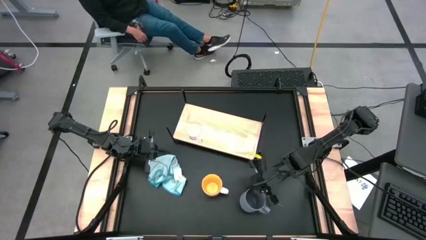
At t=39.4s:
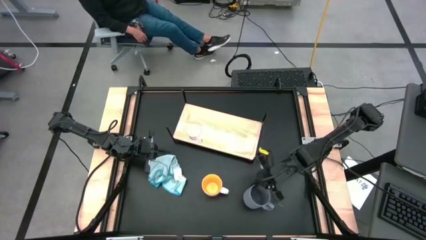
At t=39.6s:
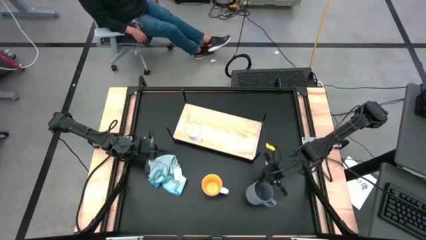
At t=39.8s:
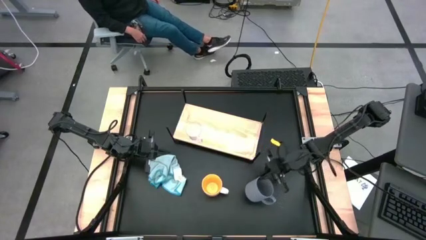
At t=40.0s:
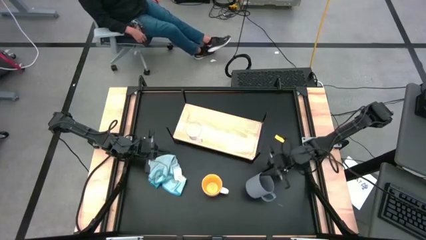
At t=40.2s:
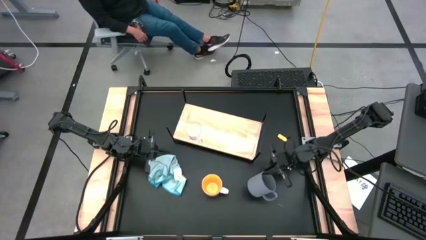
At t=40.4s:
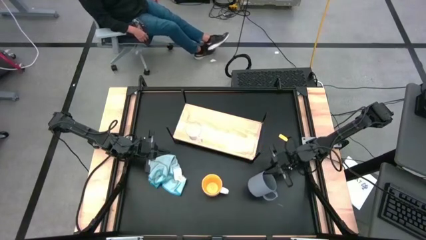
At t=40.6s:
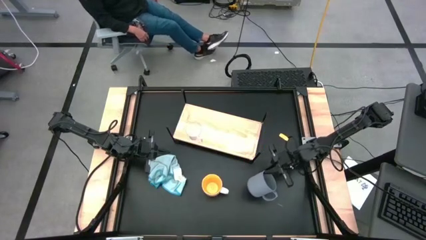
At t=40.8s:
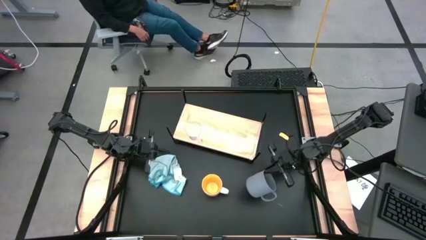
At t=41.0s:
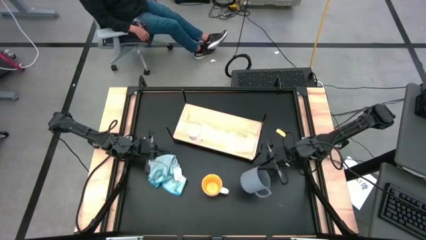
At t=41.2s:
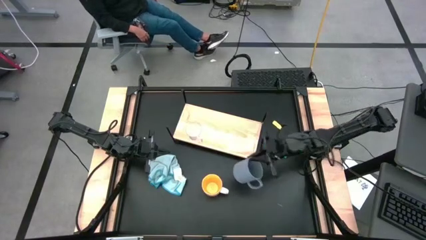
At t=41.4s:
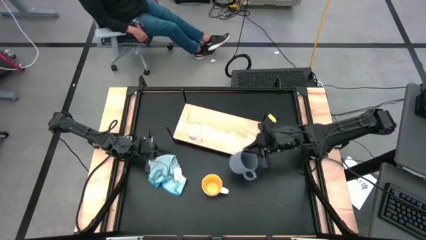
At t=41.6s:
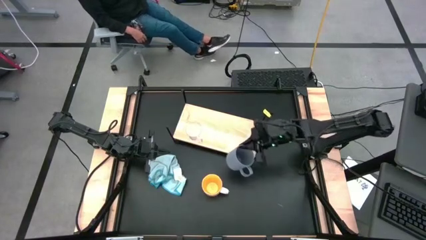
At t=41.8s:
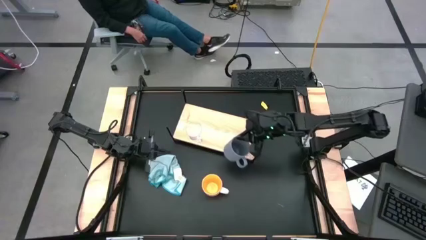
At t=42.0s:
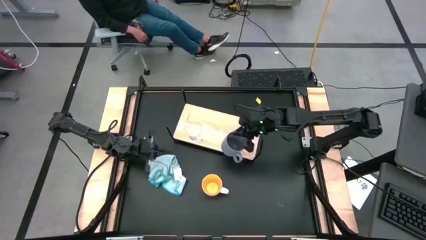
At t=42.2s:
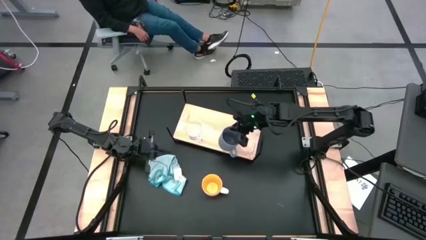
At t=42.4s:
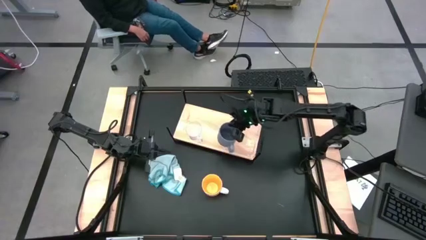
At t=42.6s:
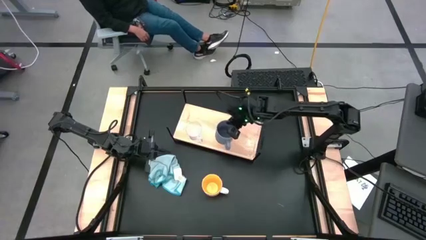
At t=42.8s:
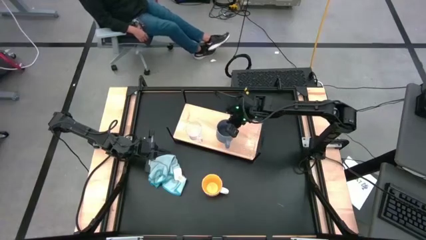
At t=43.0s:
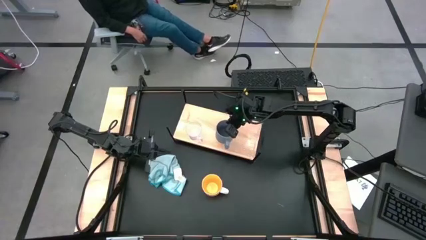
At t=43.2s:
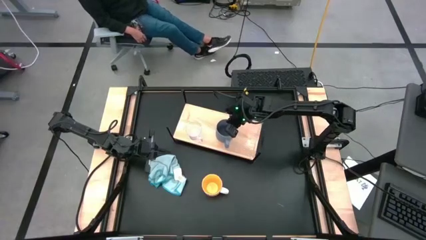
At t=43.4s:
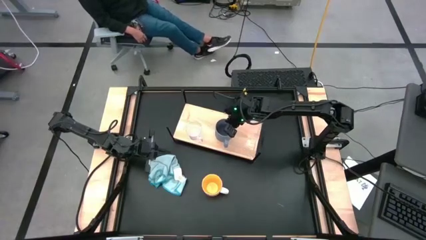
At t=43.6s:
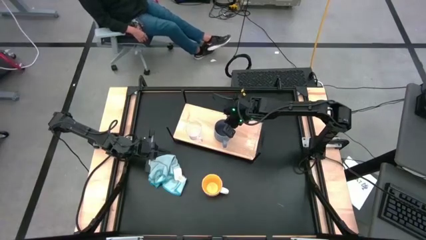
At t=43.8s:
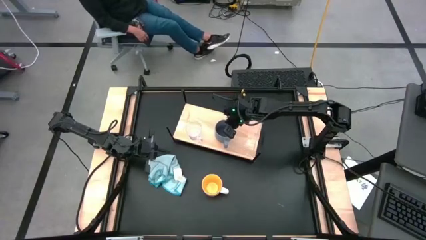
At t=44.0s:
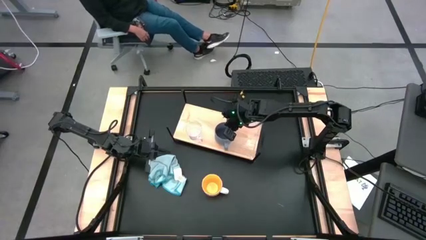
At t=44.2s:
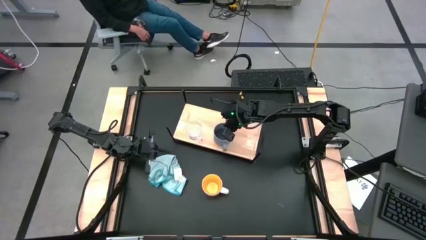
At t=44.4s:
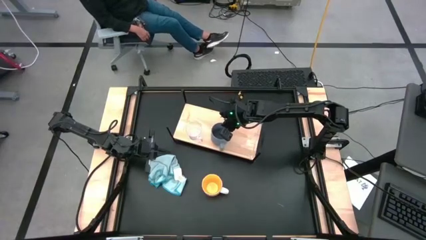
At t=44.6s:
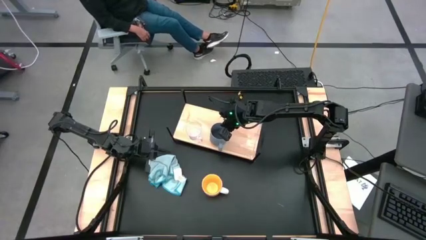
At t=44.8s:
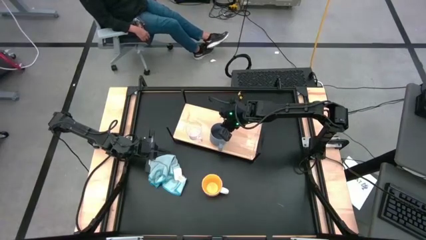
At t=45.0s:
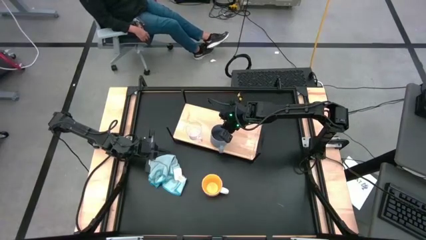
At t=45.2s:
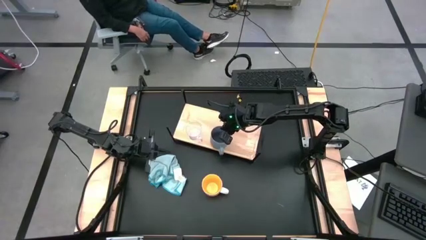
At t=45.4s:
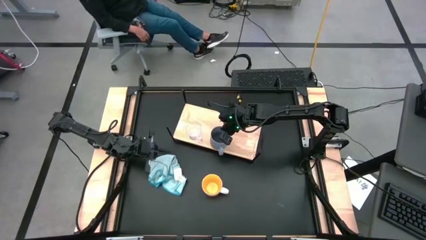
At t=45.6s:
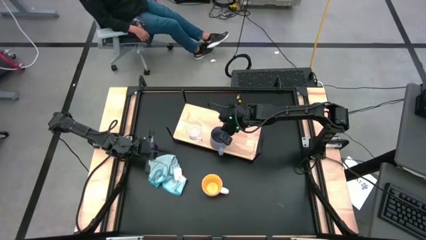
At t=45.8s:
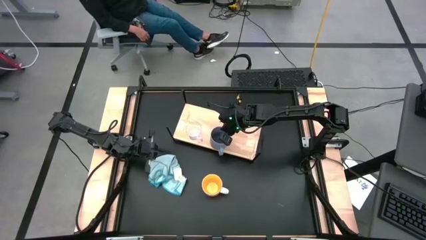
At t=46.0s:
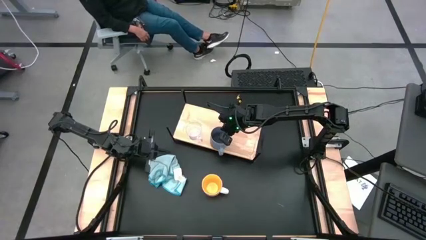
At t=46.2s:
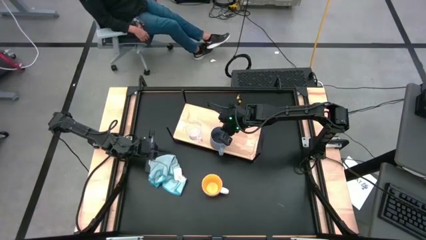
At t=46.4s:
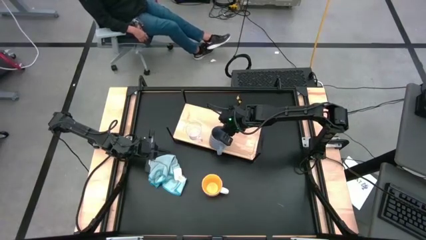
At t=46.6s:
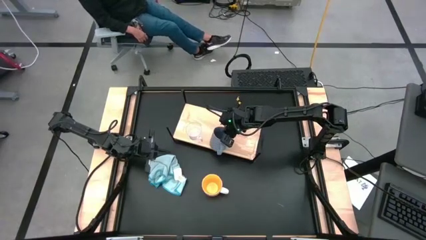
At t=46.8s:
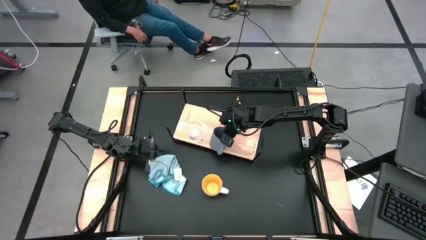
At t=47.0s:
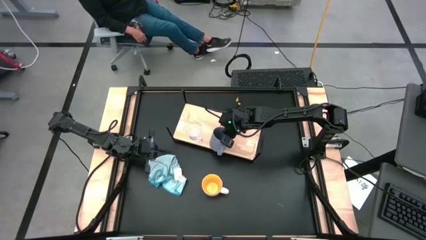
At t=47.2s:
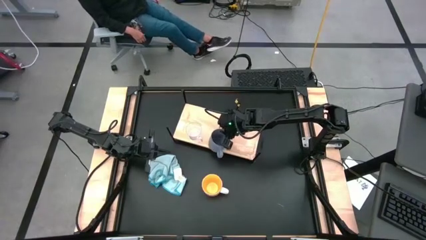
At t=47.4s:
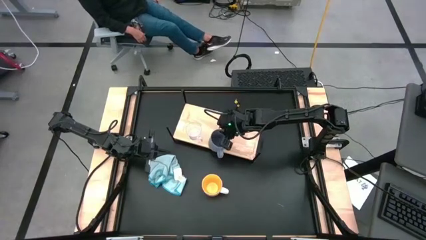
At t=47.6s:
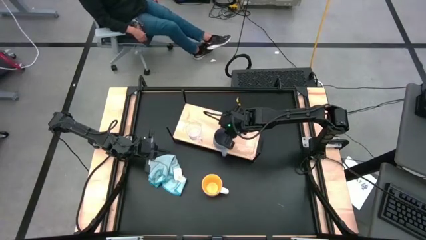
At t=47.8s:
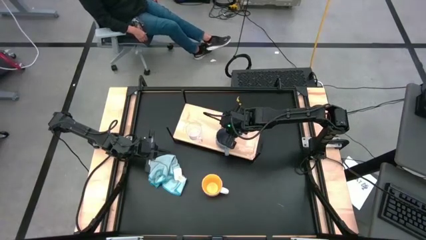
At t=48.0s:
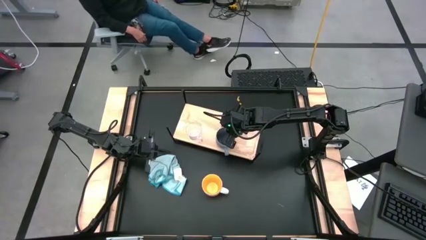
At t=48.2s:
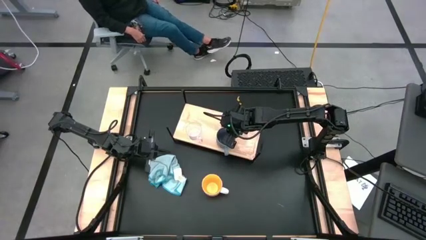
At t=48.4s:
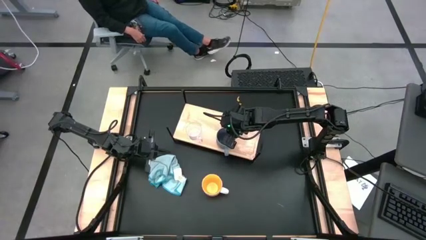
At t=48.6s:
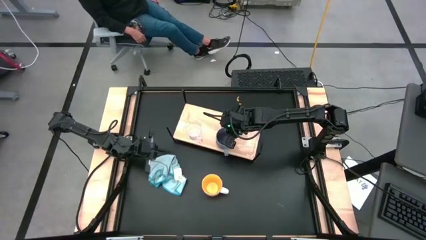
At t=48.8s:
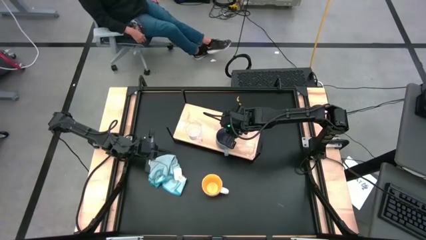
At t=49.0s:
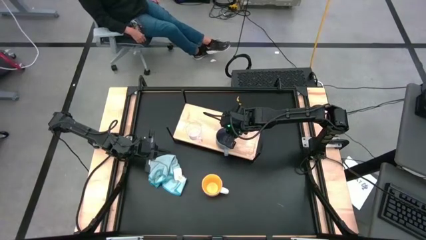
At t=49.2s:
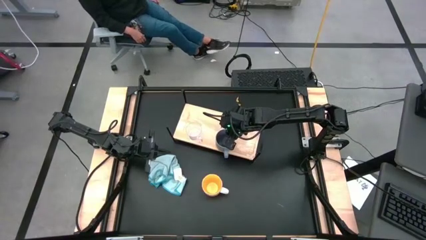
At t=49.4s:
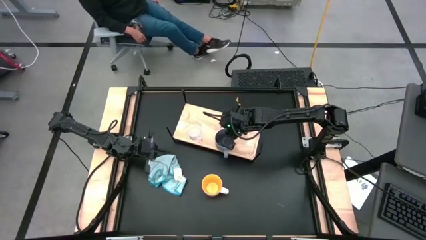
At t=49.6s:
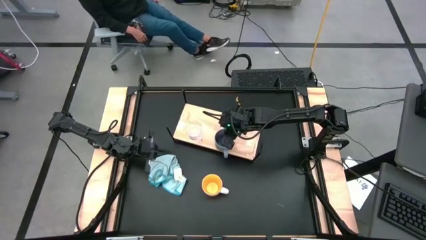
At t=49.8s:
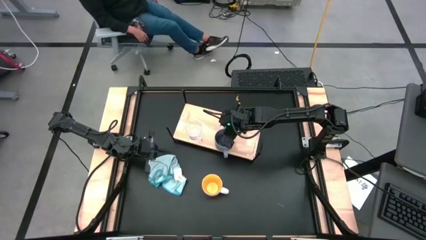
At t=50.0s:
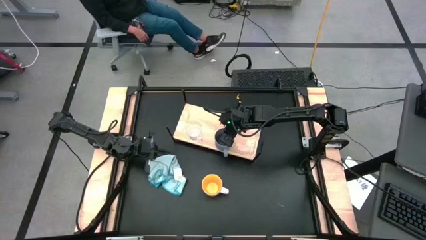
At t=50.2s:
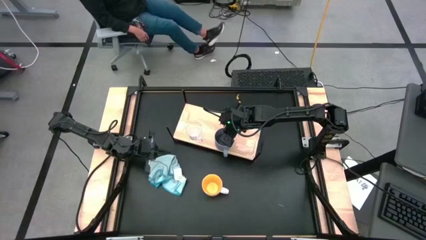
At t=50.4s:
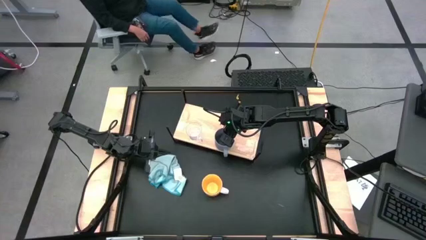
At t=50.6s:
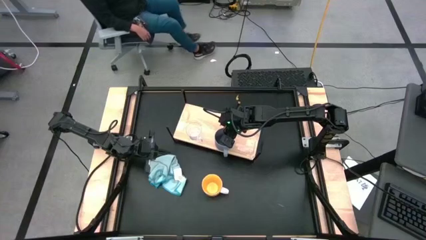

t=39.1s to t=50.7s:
Task: Stack small to large cups/mugs on shelf
Put the gray mug on the shelf

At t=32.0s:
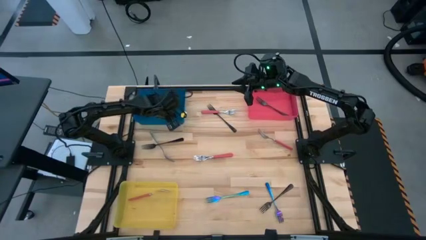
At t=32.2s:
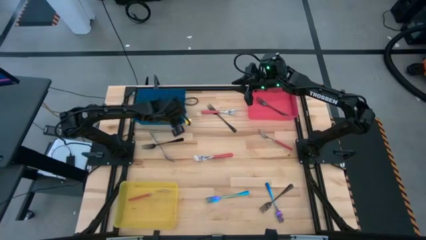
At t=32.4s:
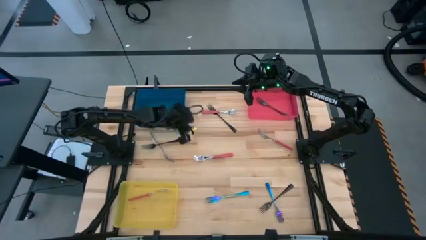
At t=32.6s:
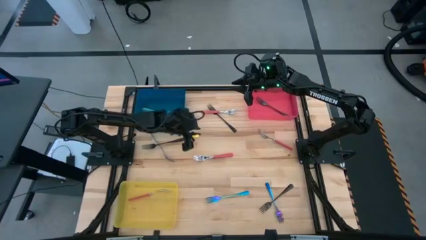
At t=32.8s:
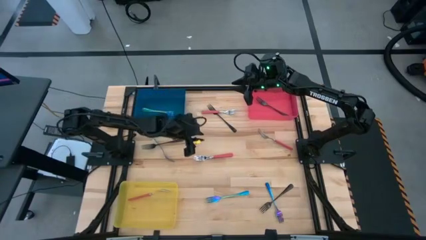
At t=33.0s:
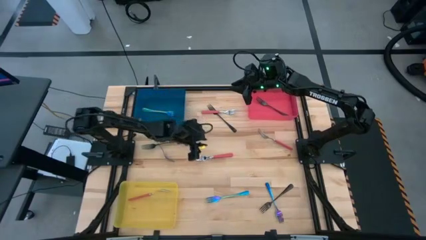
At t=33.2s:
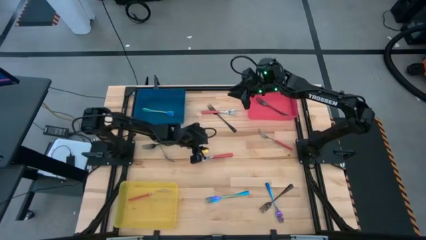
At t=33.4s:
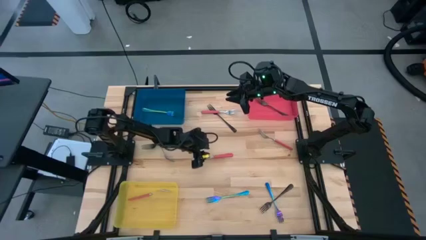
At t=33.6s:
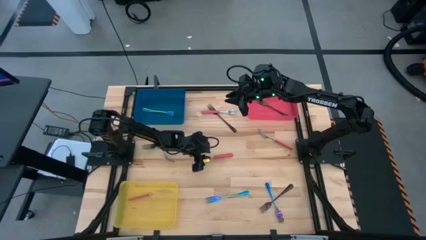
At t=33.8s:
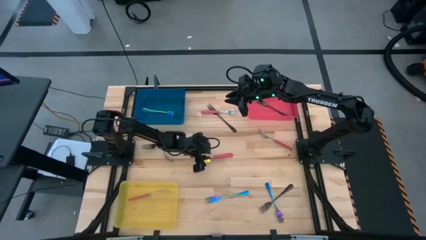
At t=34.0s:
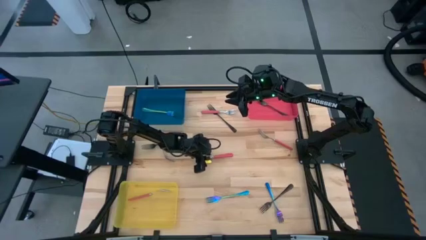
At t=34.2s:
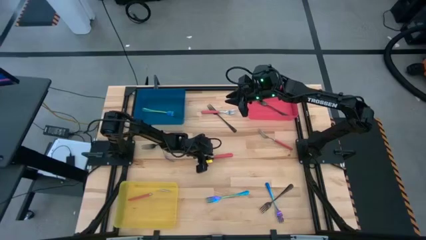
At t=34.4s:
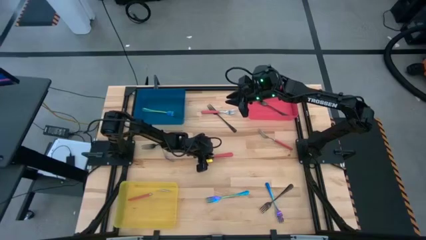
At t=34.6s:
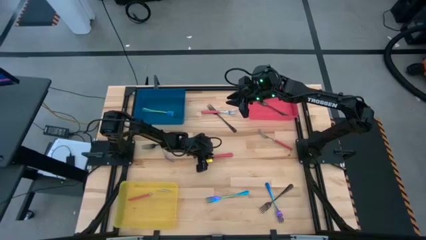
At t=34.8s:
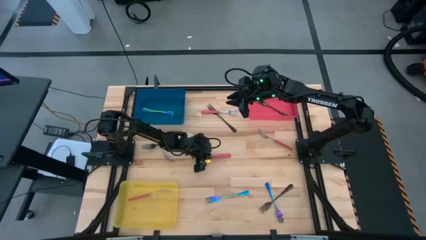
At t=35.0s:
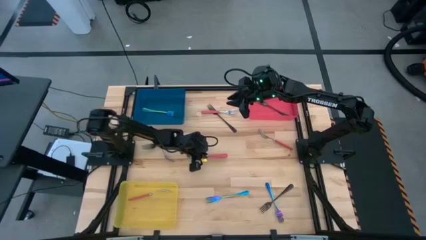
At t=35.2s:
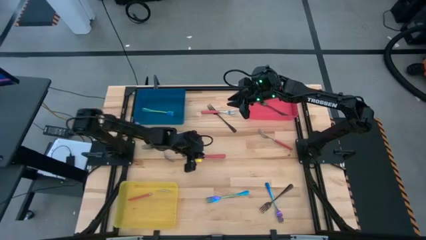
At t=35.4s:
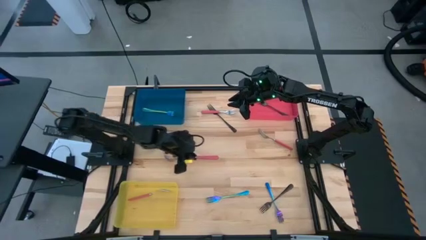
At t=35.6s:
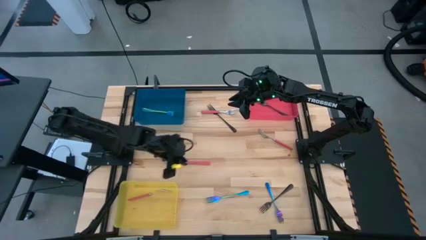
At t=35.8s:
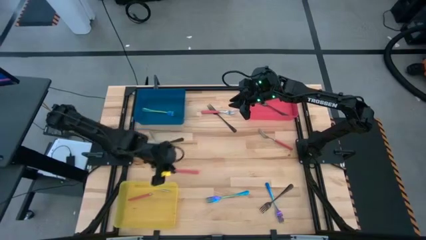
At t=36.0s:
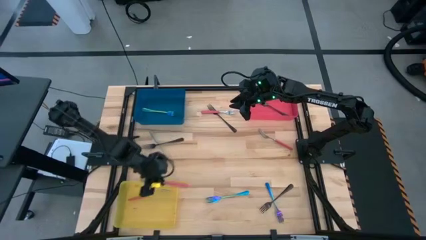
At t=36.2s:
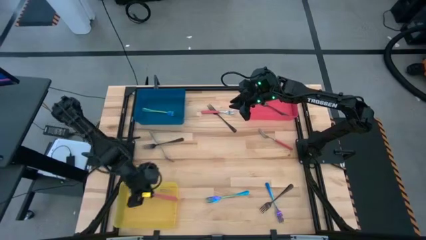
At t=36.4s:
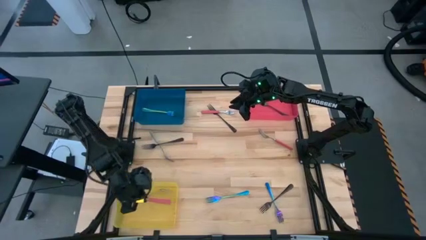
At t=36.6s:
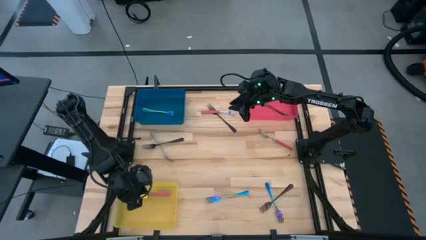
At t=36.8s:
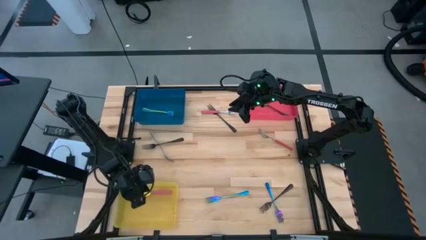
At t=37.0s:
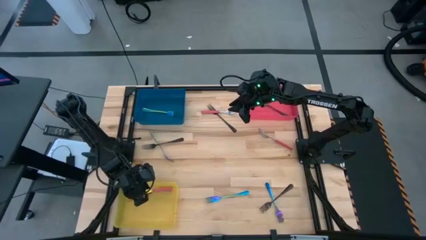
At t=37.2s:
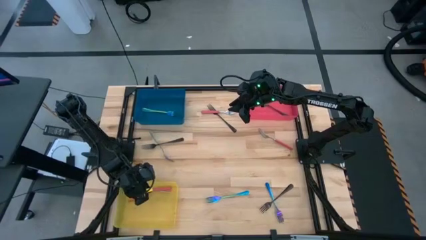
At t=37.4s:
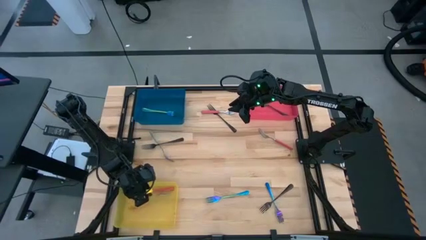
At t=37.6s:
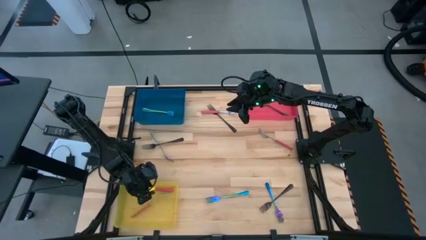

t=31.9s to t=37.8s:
Task: Sort silverware by color (type)
Put the bottom left pink fork into the yellow bin
